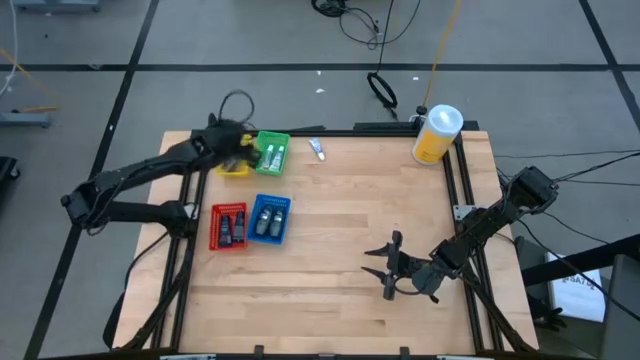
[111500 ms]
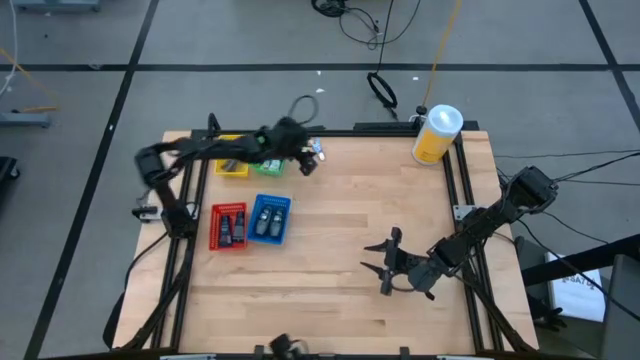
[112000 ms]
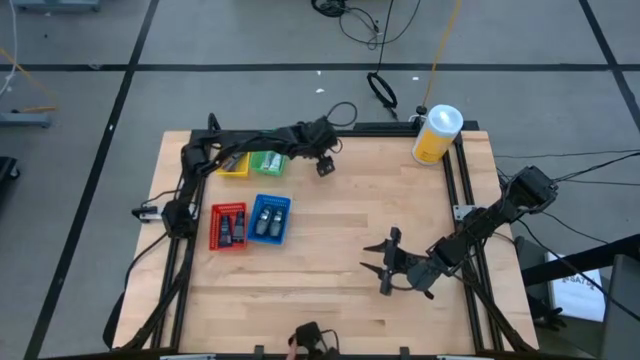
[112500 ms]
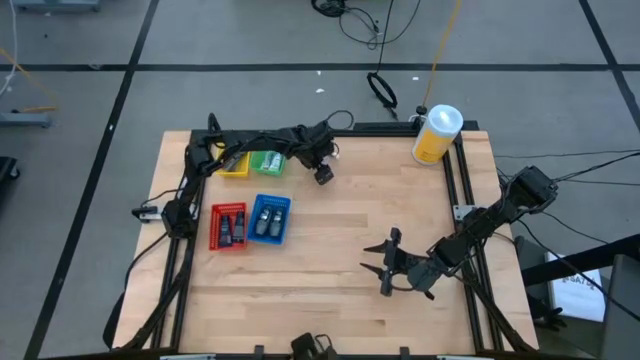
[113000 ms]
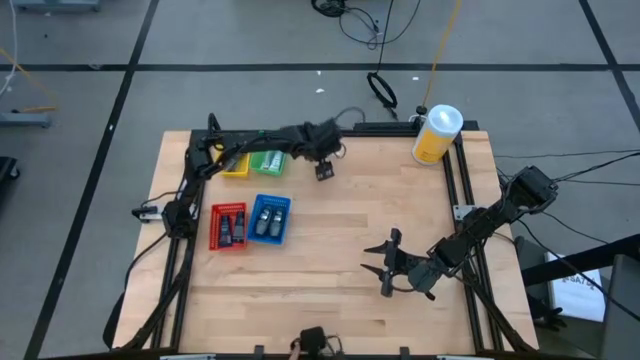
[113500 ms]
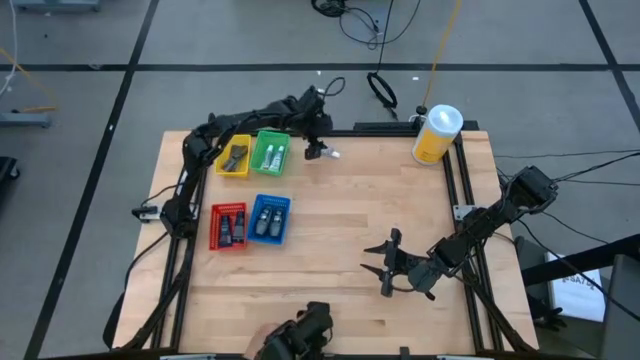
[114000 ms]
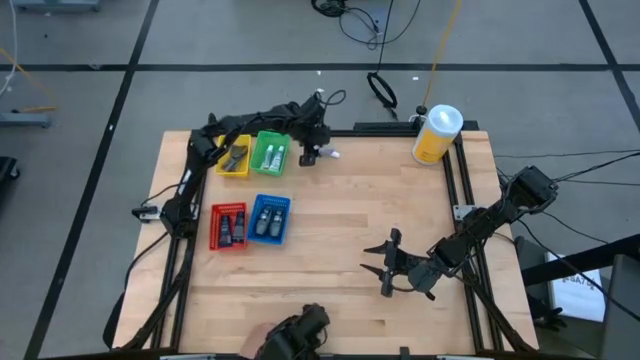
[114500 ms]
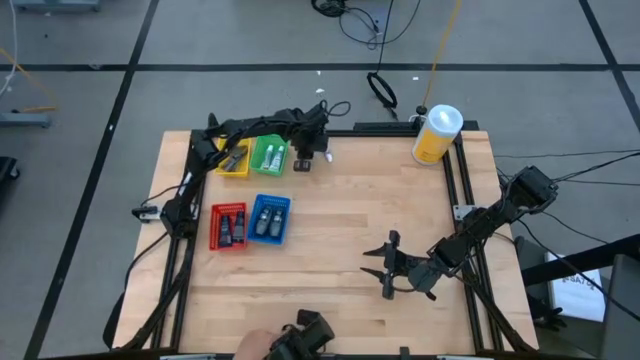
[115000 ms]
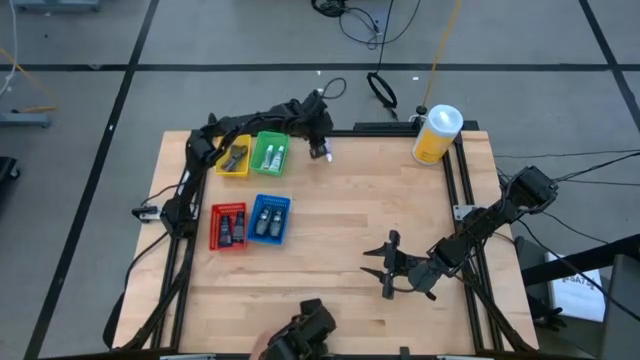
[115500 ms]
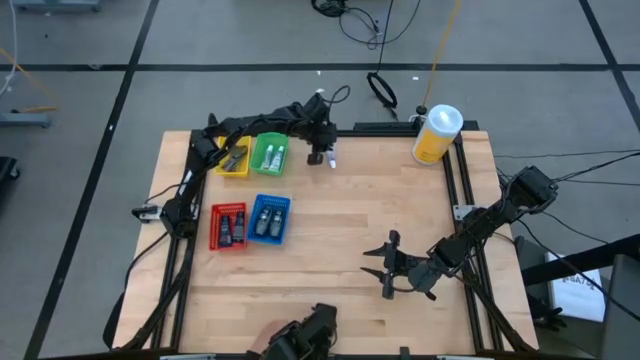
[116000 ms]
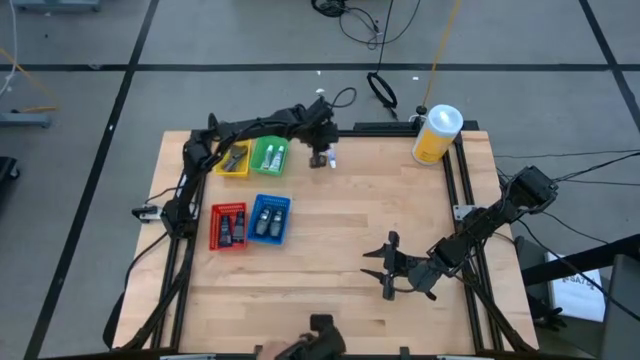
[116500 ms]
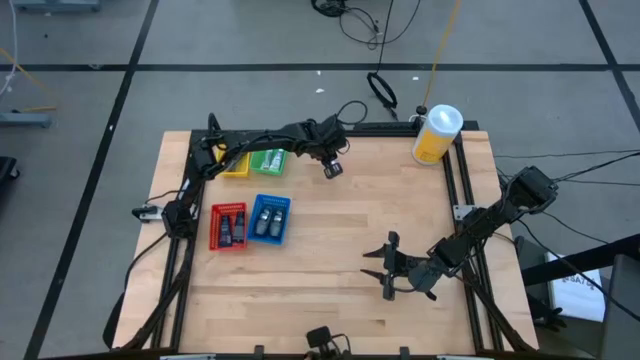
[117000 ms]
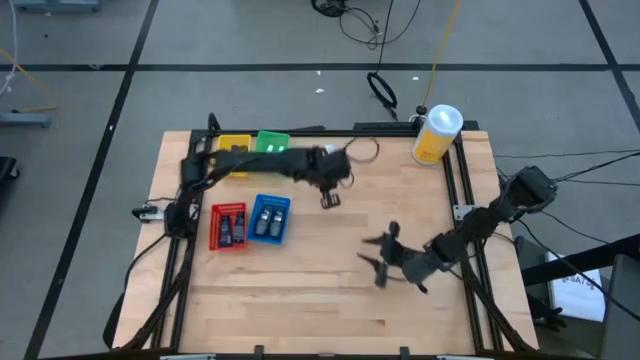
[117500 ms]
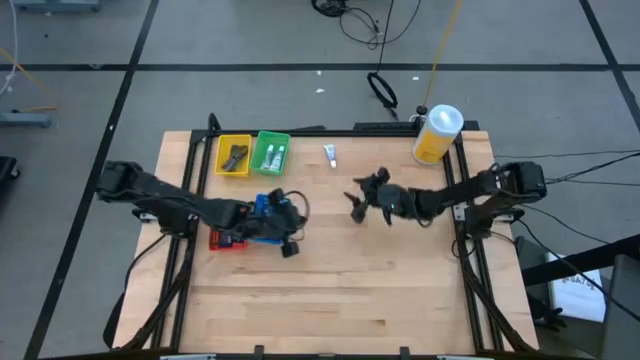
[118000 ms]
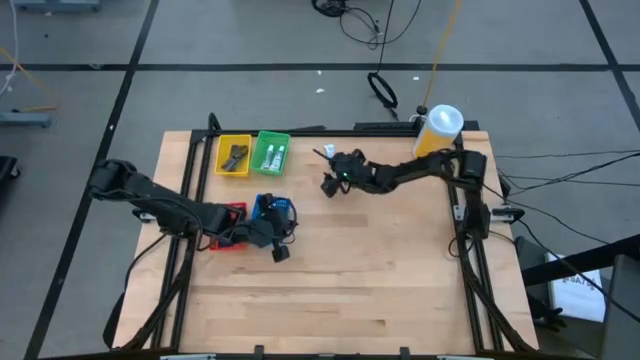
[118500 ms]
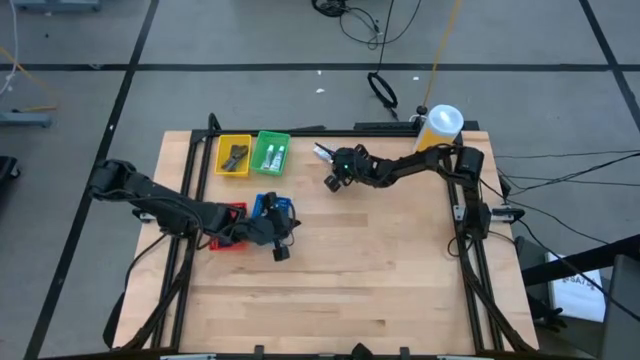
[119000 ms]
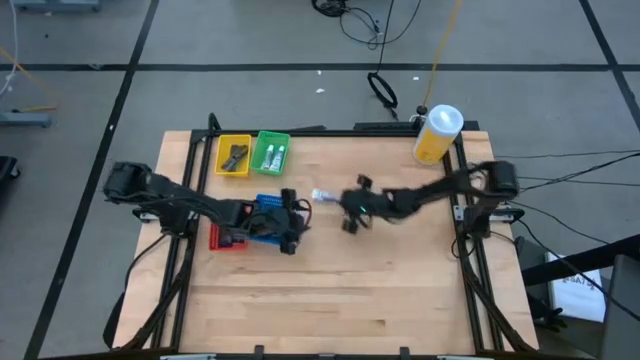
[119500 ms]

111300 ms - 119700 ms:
Task: Pick & Place Travel size toiletries
Put the white toothpaste into the green bin

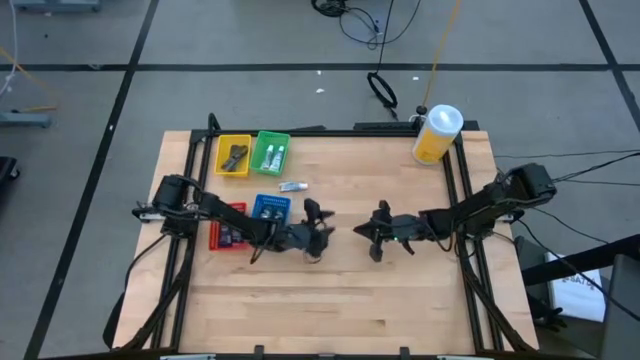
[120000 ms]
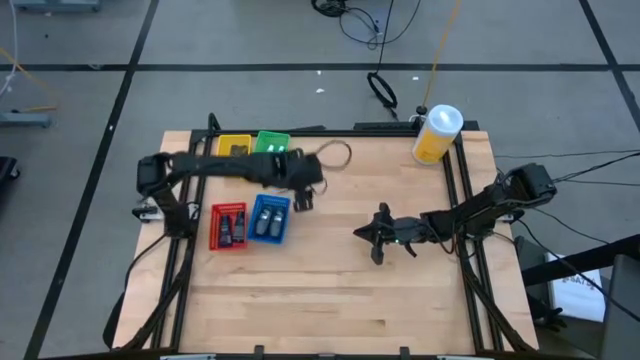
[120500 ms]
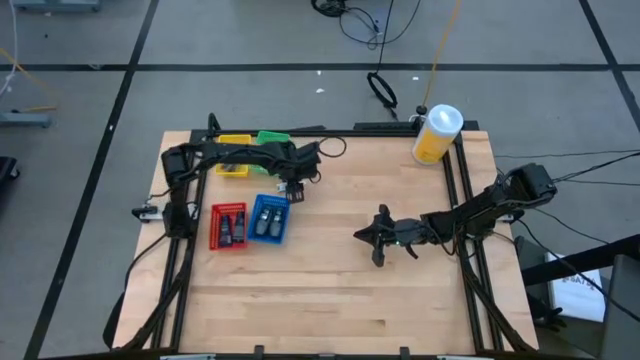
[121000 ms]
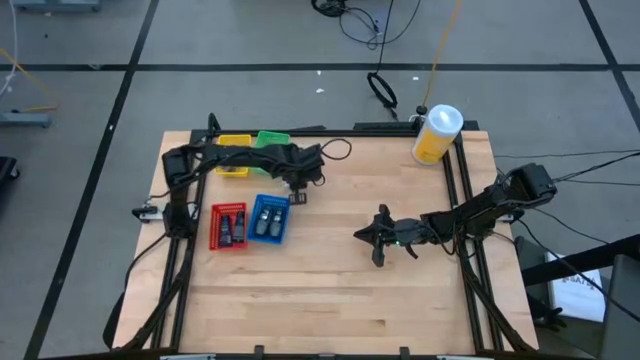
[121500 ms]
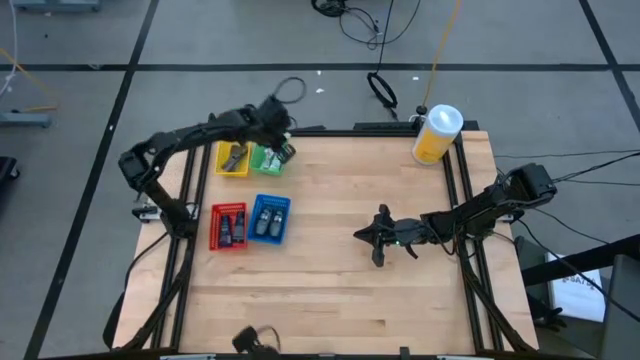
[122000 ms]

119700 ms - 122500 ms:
Put the white toothpaste into the green bin

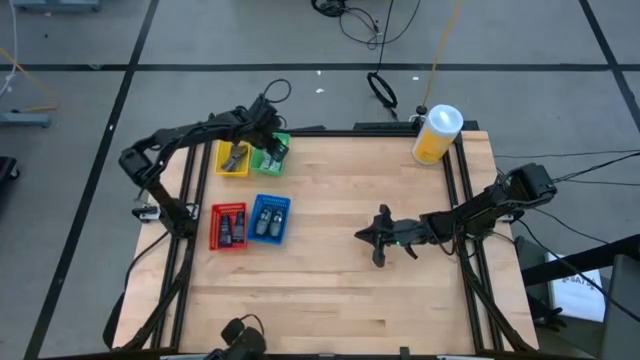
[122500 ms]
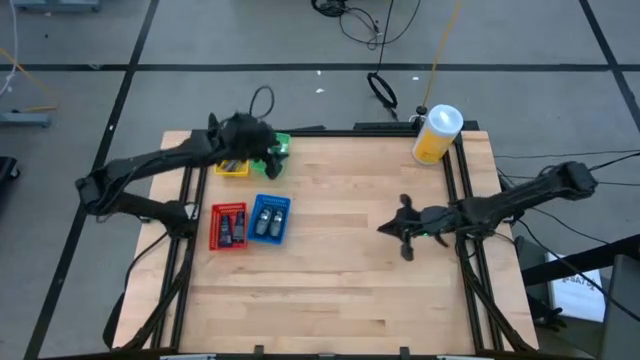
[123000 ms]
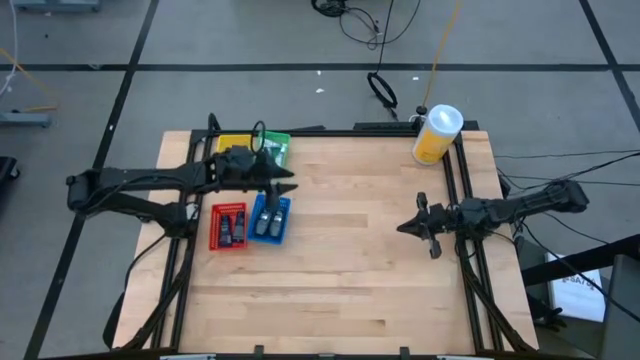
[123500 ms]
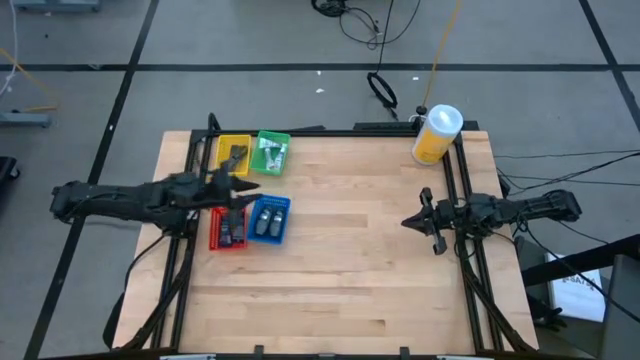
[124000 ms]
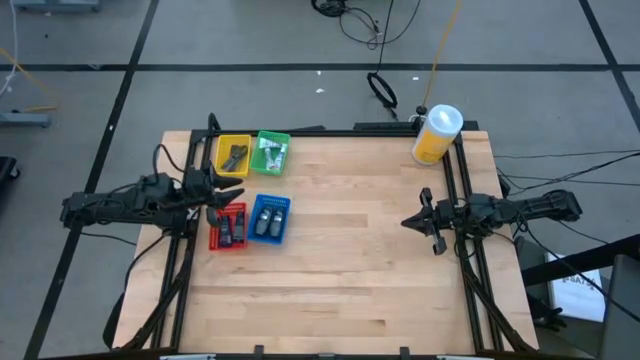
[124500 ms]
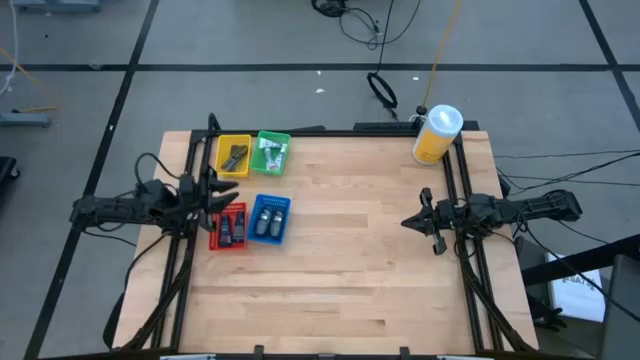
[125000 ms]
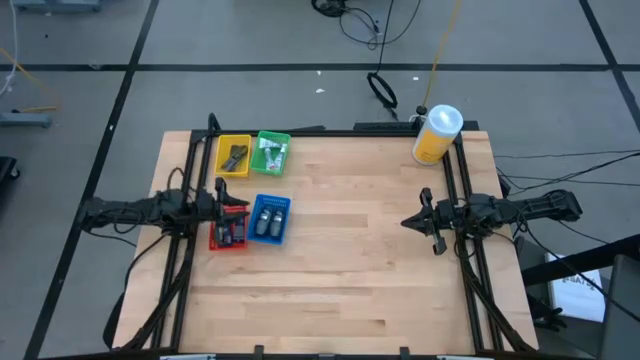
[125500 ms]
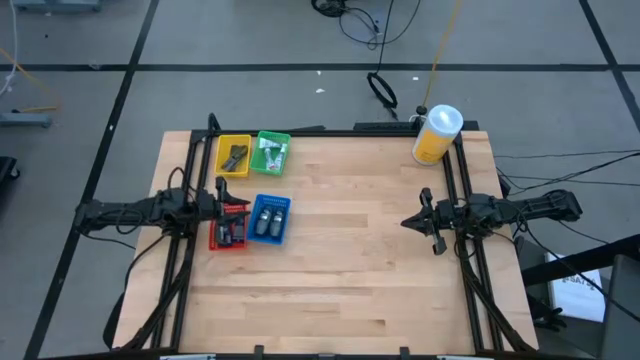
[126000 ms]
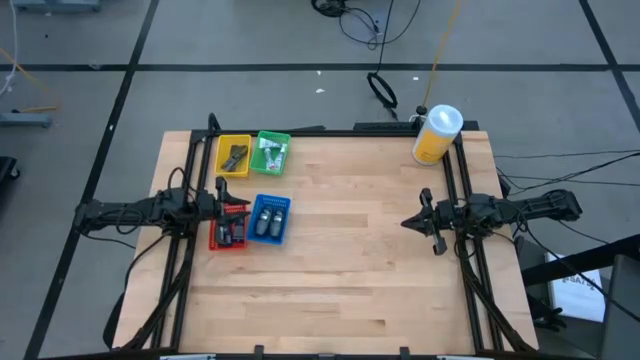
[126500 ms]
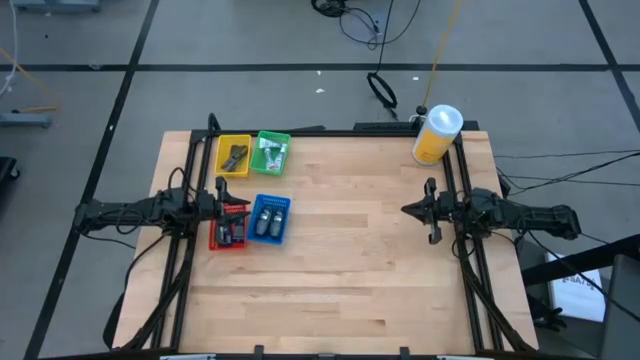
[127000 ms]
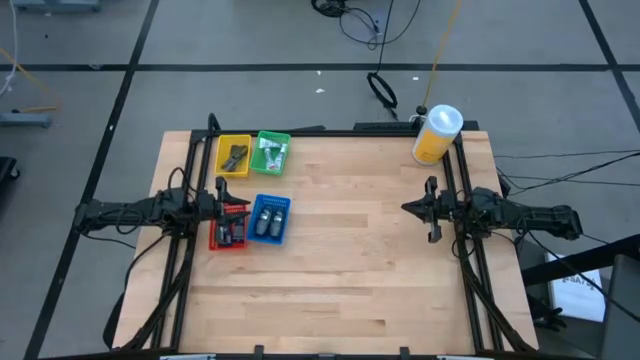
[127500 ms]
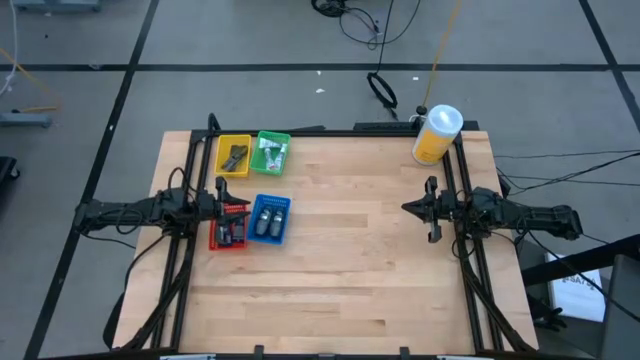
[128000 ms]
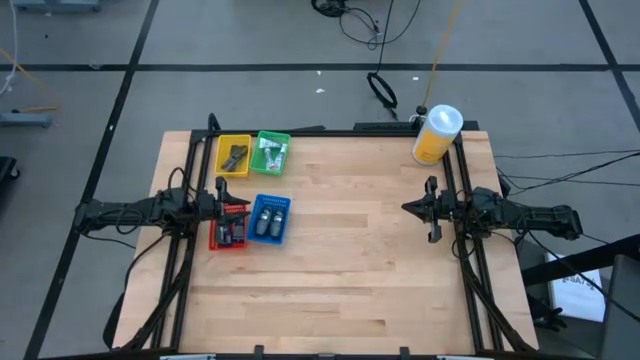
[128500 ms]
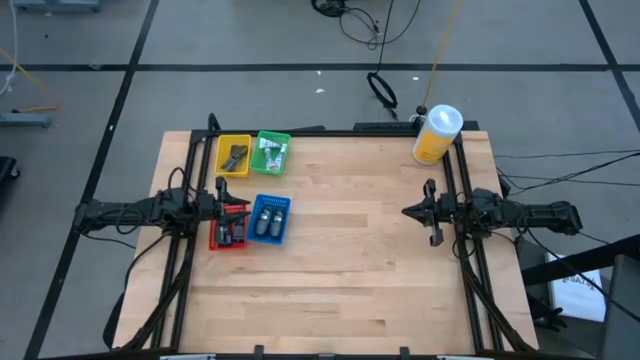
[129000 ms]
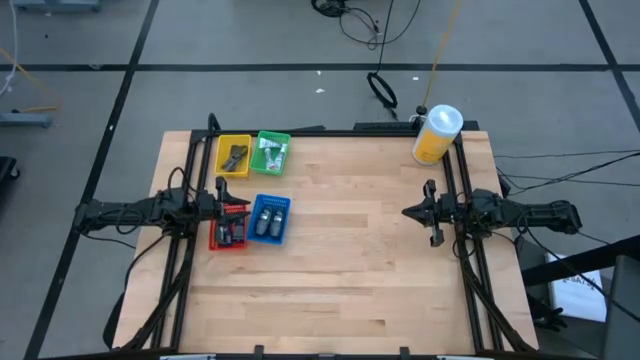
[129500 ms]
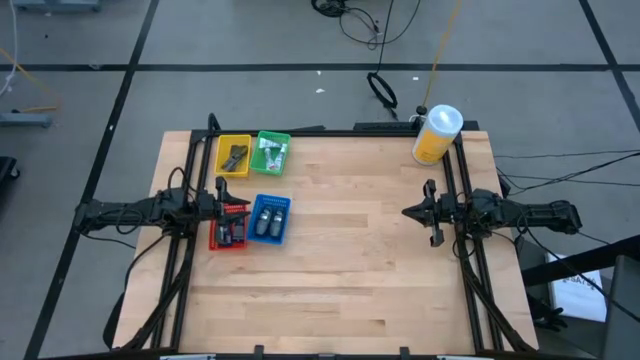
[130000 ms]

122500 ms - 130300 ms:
Return to Home Position

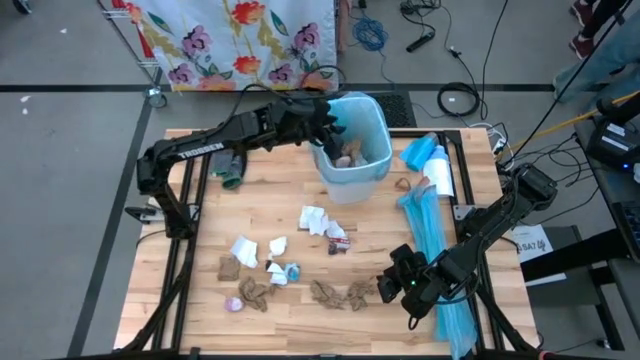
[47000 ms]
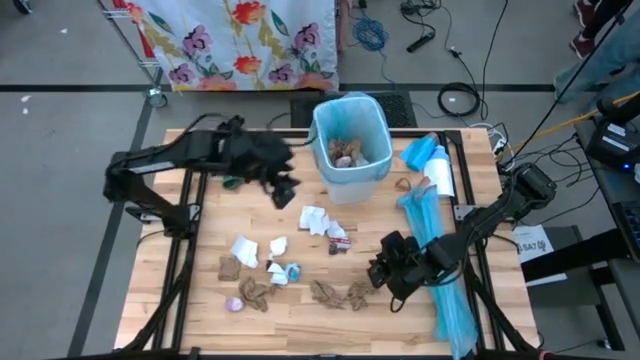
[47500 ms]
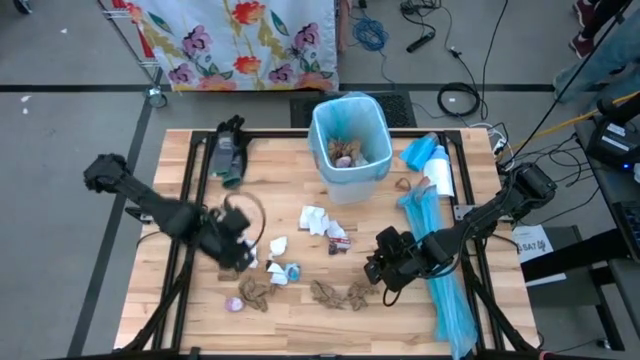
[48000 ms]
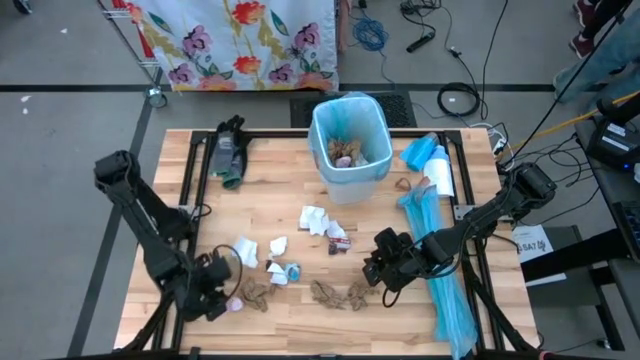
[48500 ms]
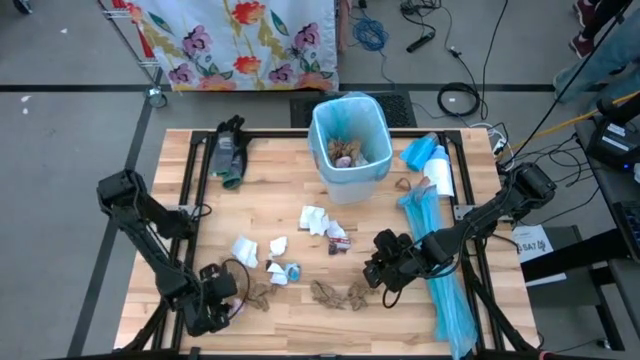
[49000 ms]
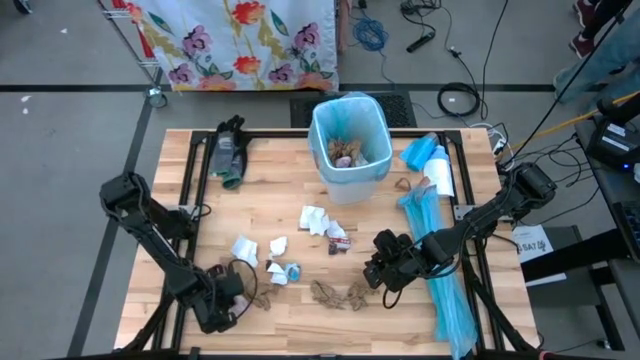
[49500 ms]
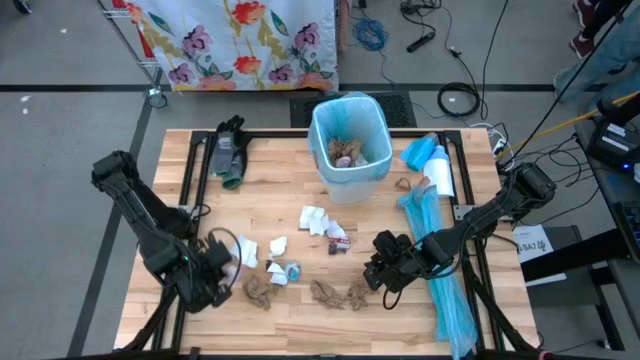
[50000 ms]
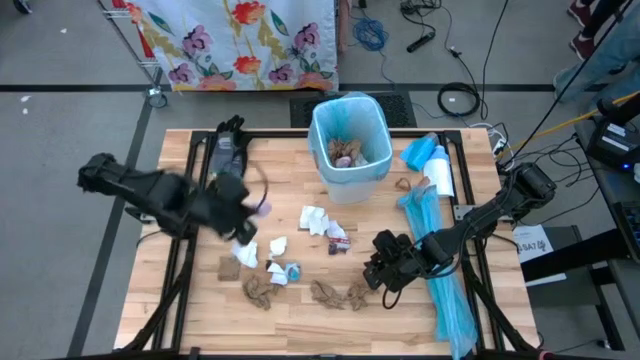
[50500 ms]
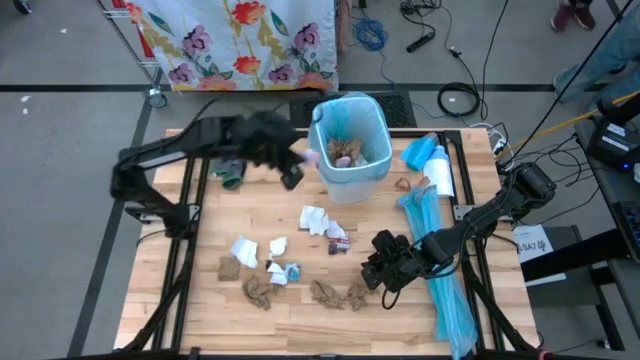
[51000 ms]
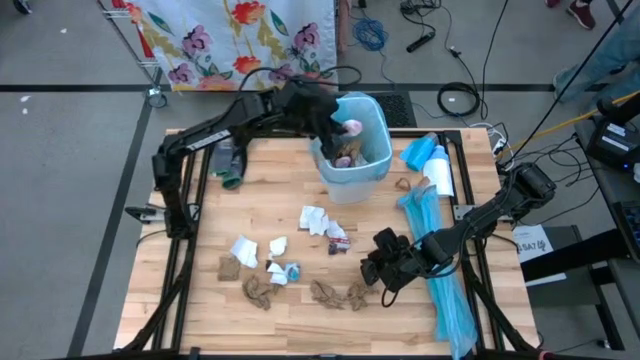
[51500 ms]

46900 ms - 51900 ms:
Task: place trash/remove bag and relplace
Put the crumpled pink trash bag into the trash bin
